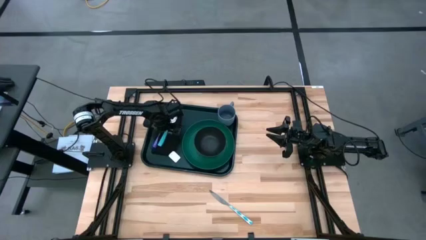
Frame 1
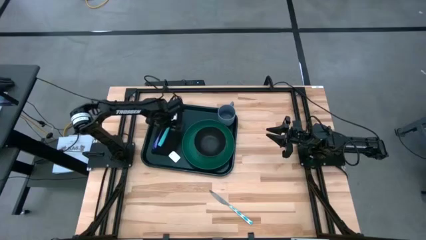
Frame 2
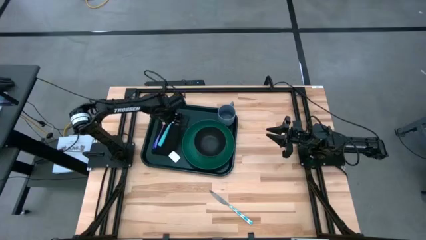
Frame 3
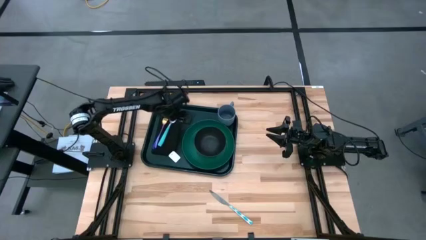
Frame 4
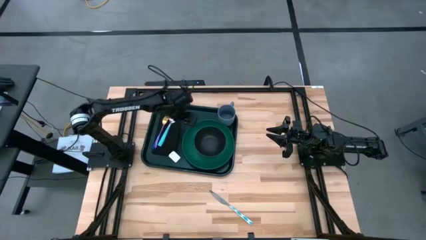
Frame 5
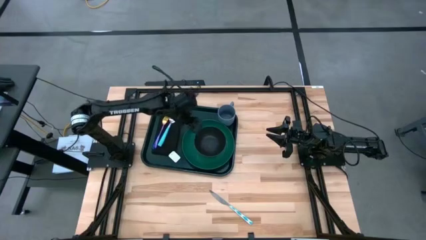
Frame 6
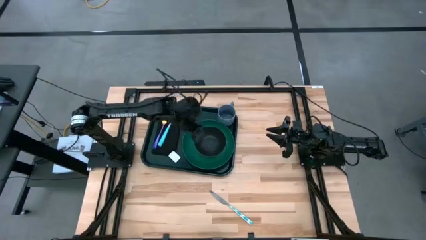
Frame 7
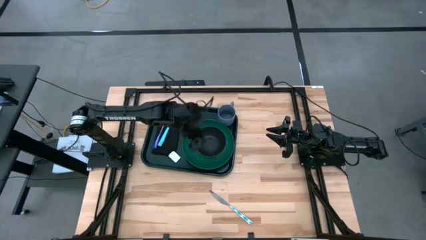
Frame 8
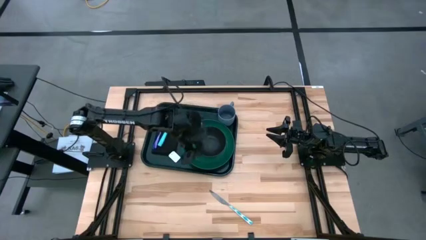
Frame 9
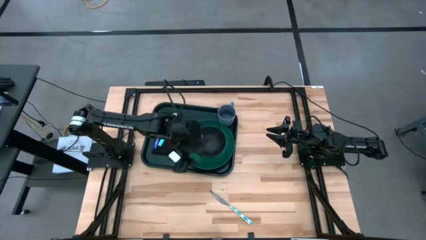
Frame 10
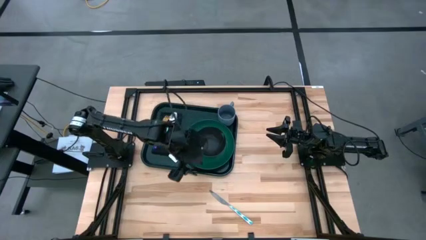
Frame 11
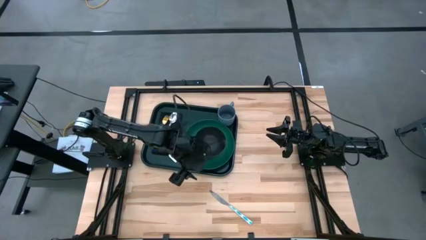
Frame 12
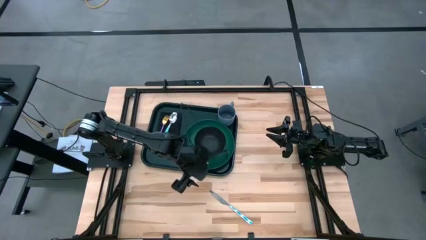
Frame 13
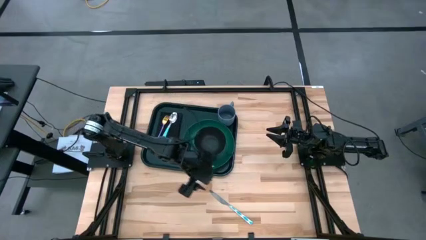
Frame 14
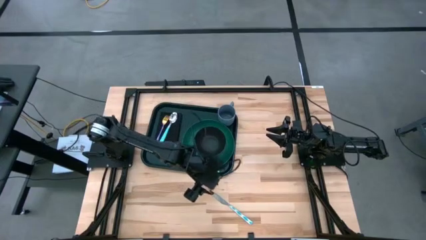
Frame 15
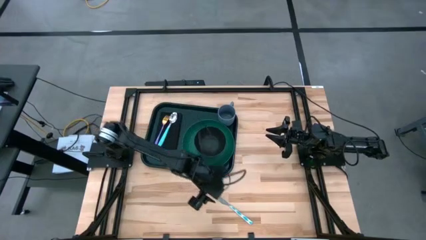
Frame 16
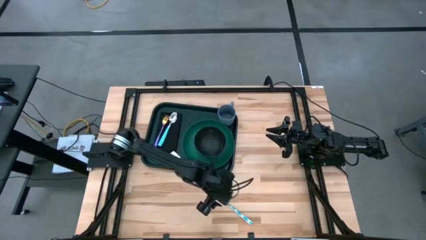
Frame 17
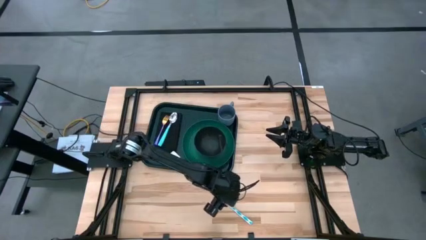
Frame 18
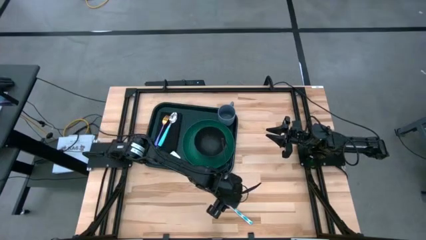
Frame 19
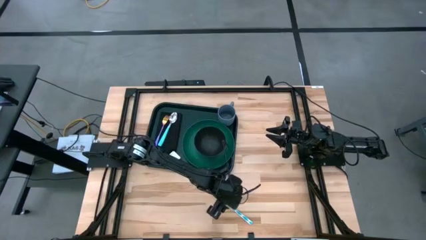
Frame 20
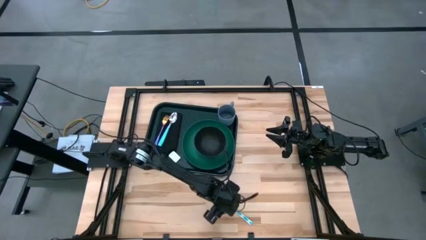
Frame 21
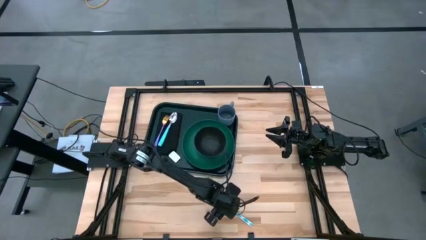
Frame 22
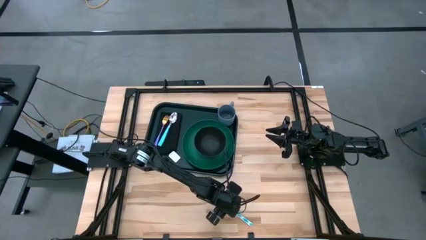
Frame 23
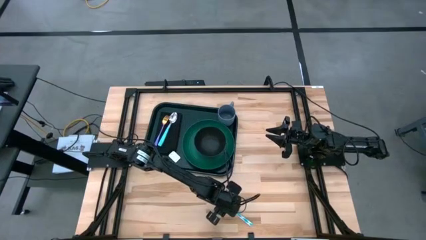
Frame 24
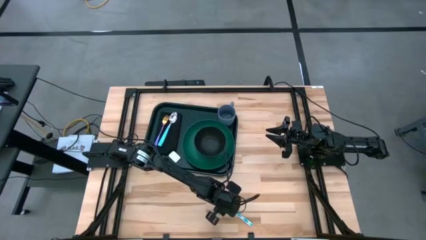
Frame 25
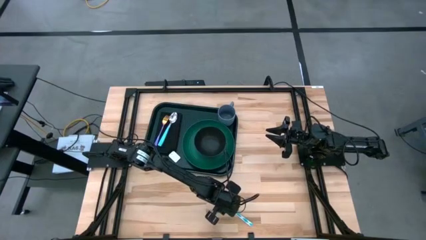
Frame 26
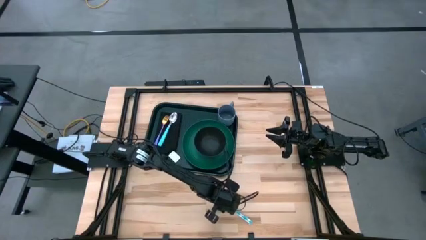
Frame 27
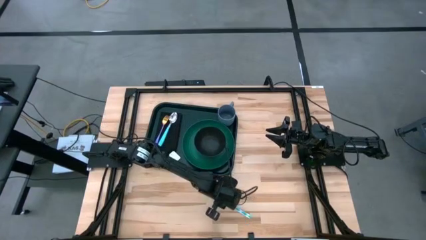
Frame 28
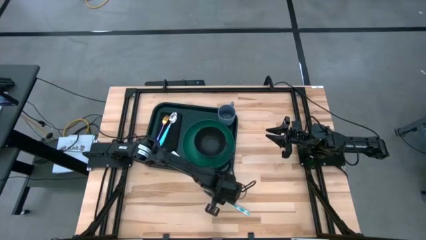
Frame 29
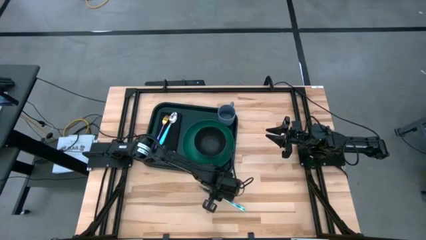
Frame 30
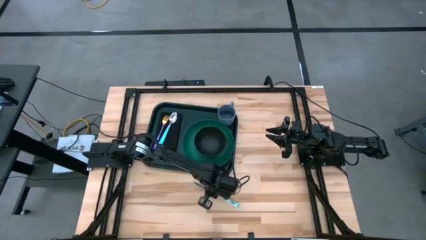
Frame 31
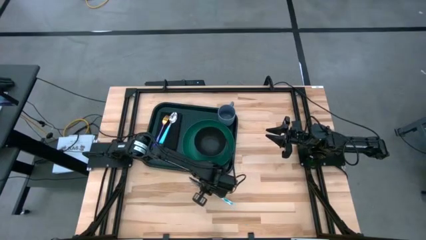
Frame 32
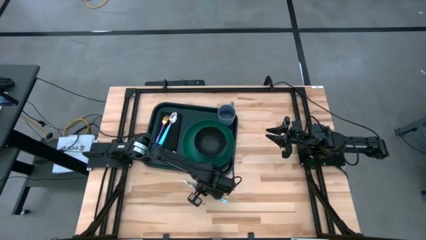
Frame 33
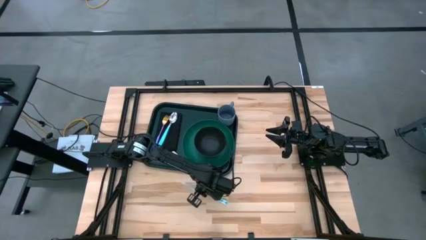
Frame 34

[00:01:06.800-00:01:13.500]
Task: Set up tray
Put the blue patterned knife on the black tray on top of the napkin

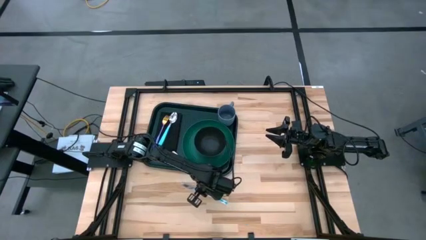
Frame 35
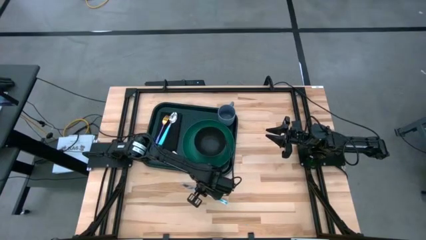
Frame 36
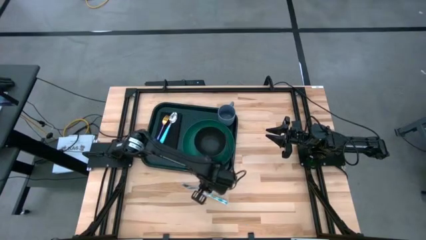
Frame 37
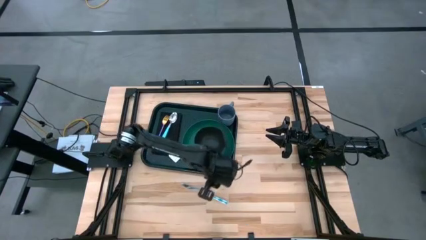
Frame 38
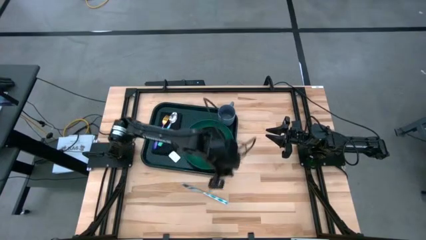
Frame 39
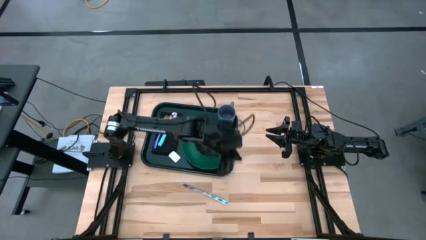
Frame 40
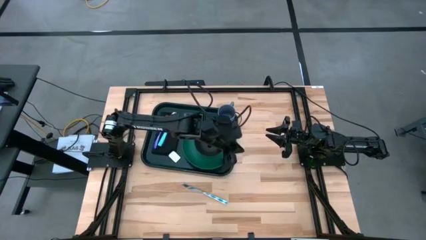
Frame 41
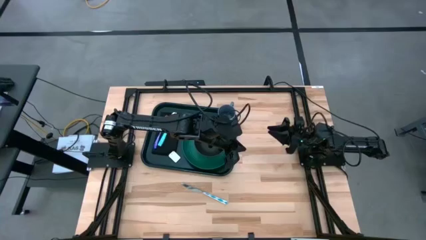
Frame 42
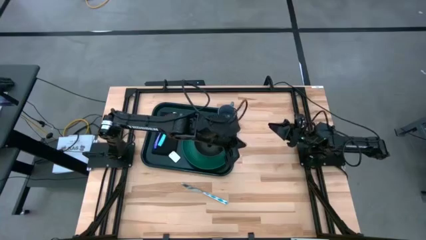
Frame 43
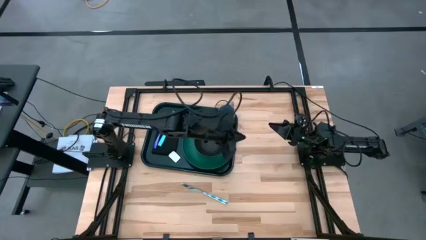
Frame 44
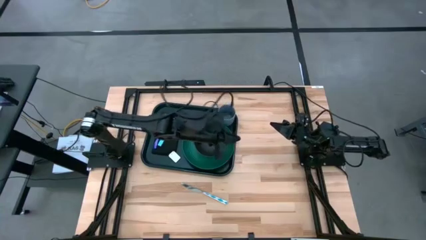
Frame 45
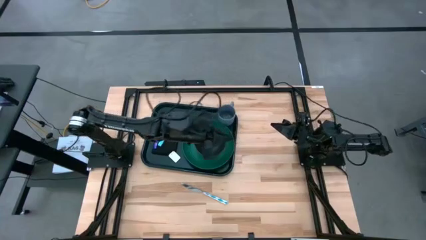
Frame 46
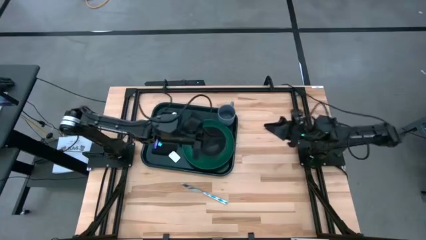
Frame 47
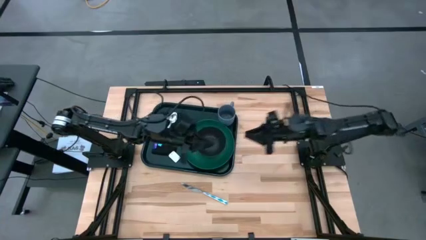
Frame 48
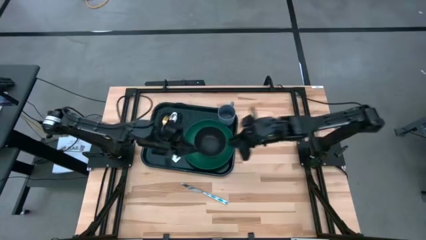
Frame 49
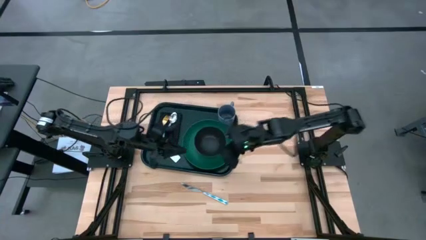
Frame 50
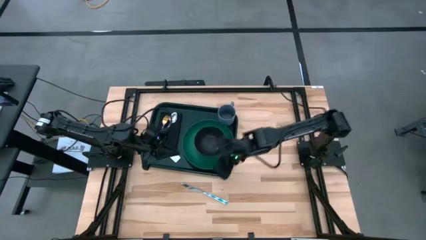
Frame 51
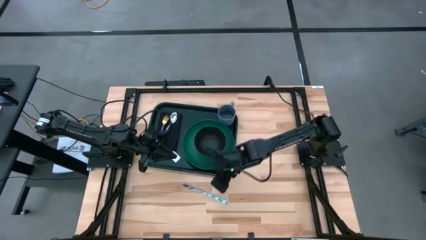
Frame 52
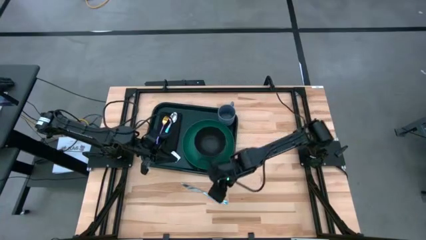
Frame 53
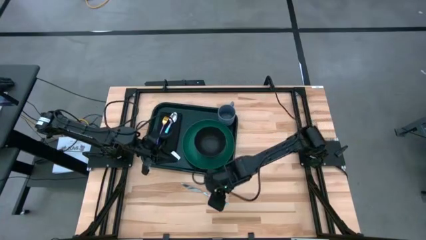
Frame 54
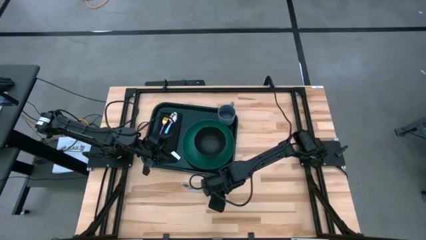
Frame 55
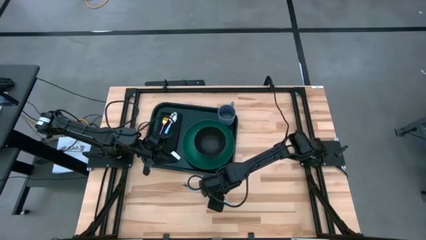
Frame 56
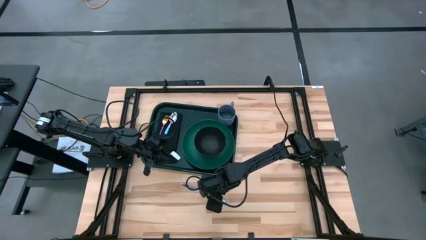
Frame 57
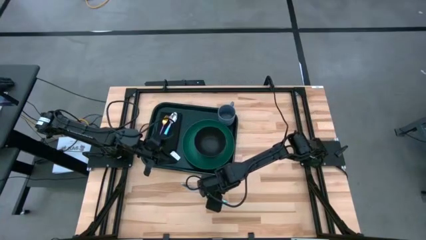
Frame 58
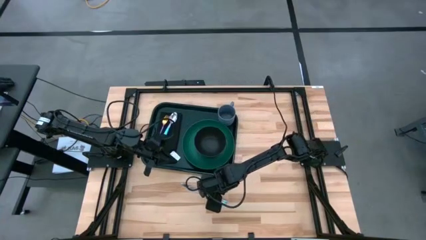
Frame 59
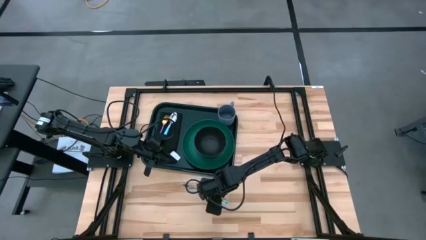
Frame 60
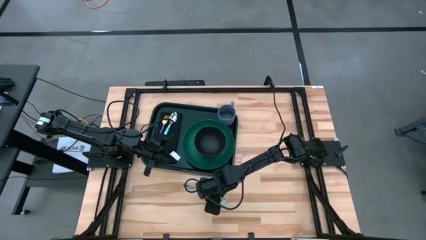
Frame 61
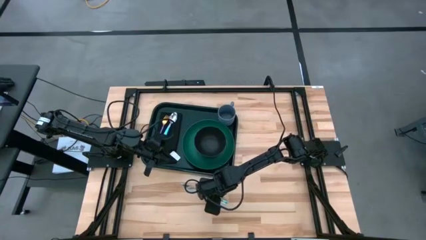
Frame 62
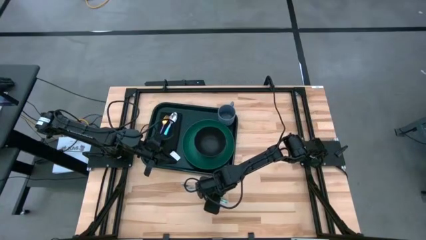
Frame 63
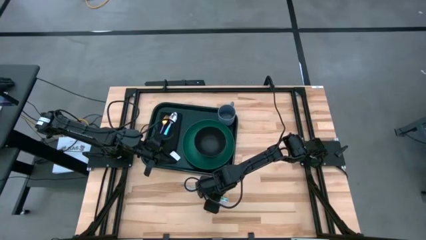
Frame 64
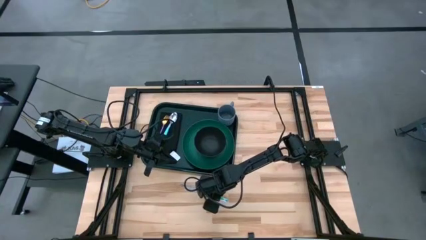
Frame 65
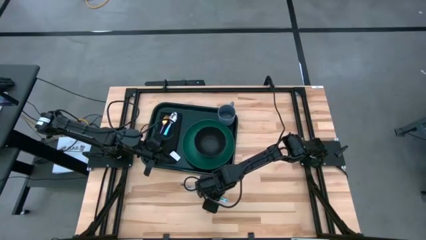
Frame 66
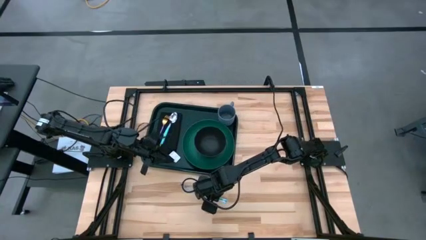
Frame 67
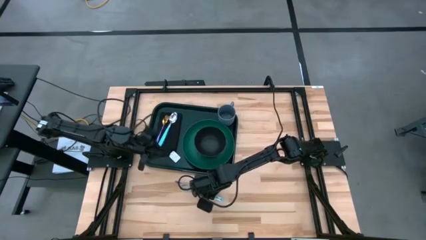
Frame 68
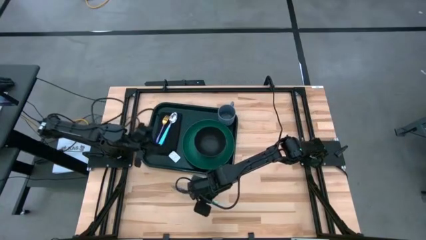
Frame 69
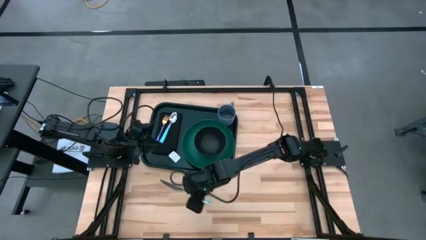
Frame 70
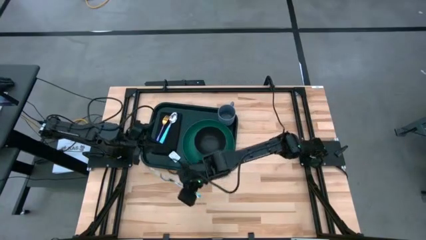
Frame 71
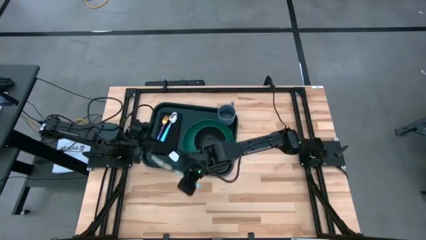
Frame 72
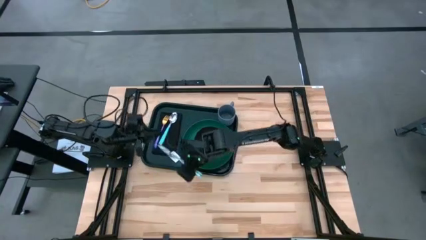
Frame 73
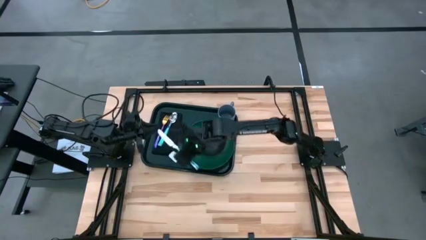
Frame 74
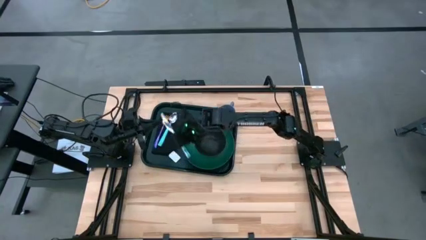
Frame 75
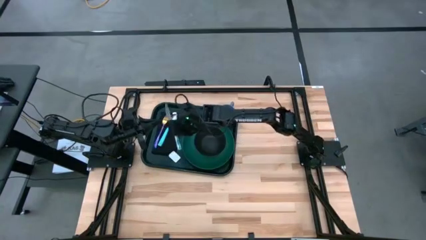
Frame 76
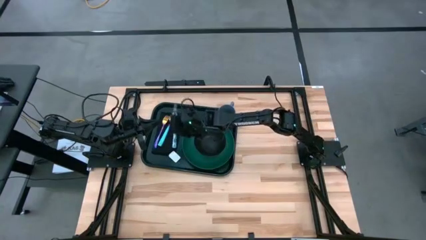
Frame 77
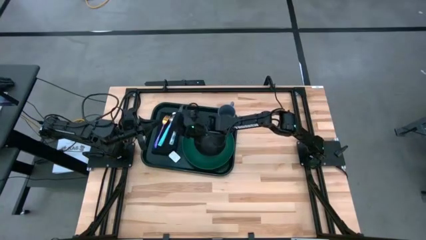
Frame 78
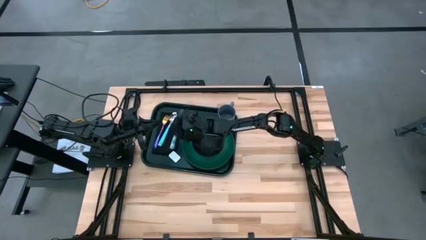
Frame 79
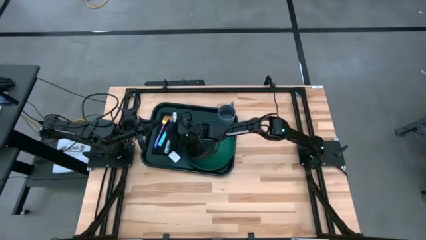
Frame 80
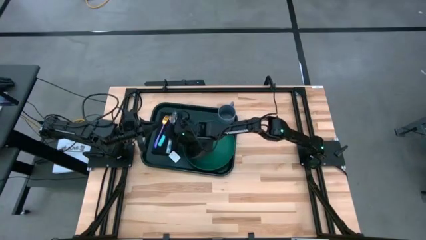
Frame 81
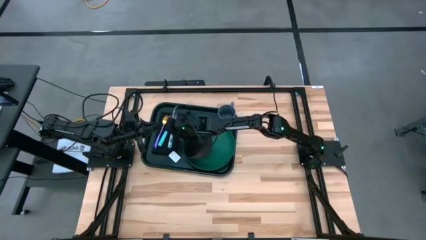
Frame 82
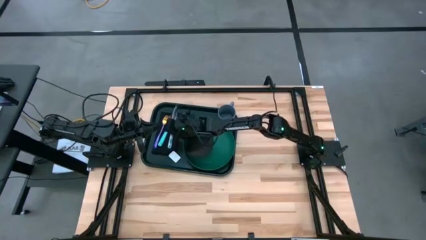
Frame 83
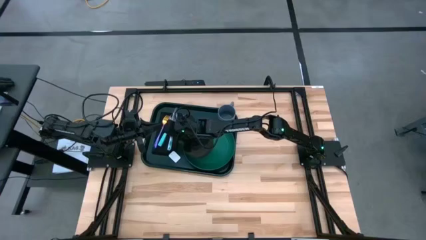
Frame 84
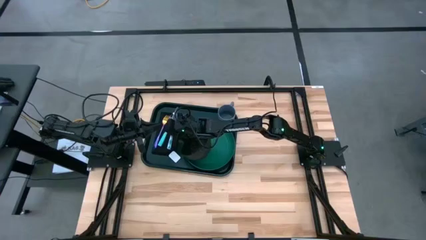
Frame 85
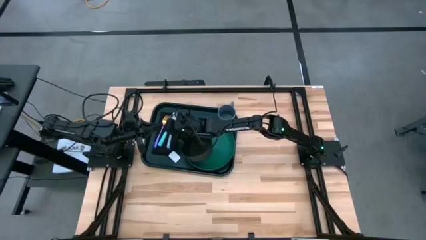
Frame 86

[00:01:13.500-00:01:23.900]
Put the blue patterned knife on the black tray on top of the napkin
